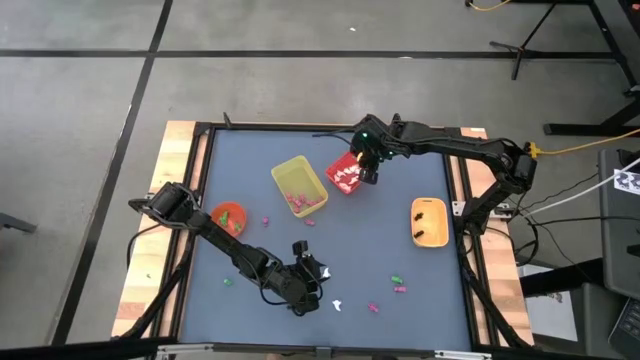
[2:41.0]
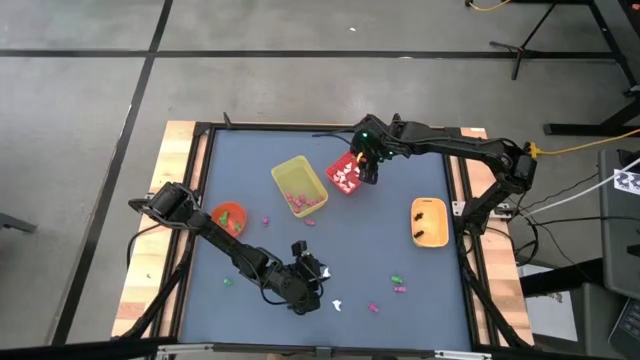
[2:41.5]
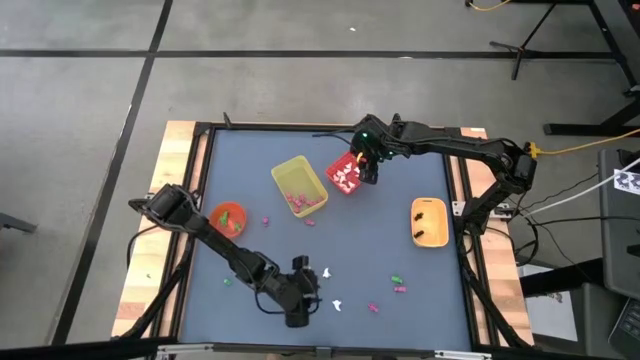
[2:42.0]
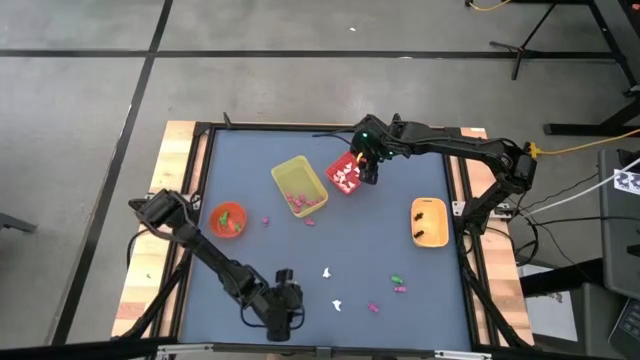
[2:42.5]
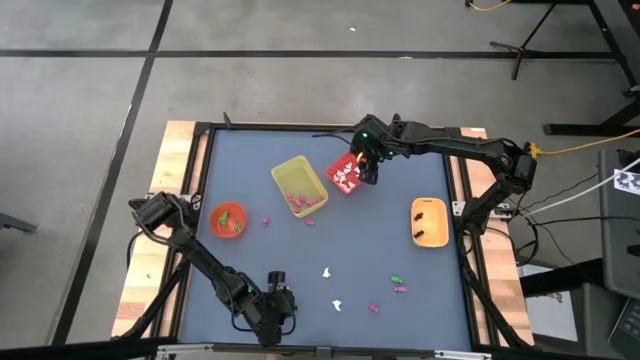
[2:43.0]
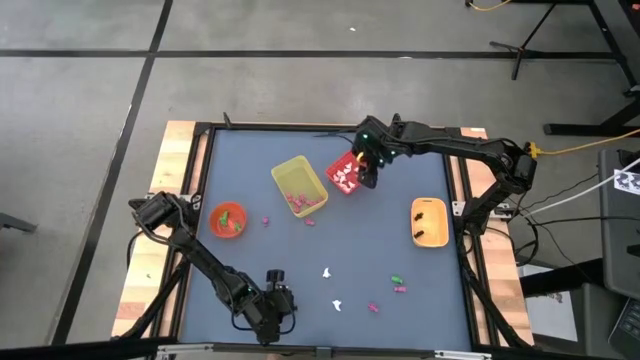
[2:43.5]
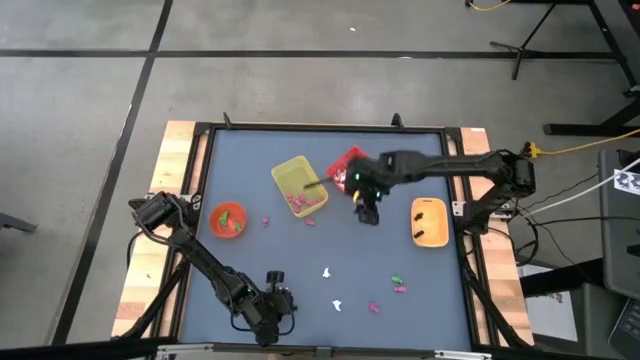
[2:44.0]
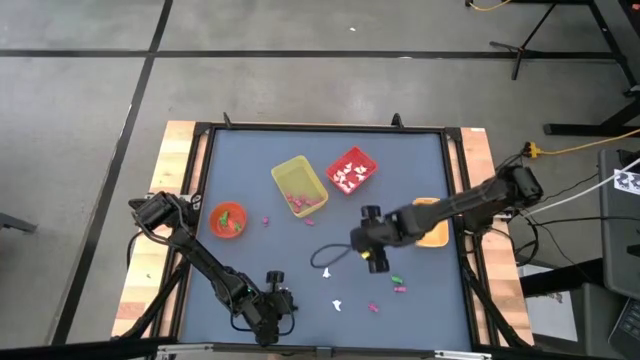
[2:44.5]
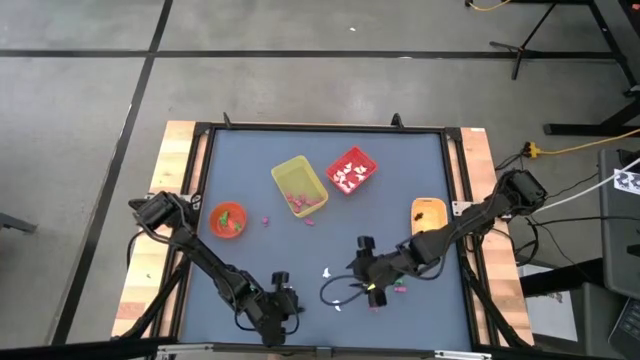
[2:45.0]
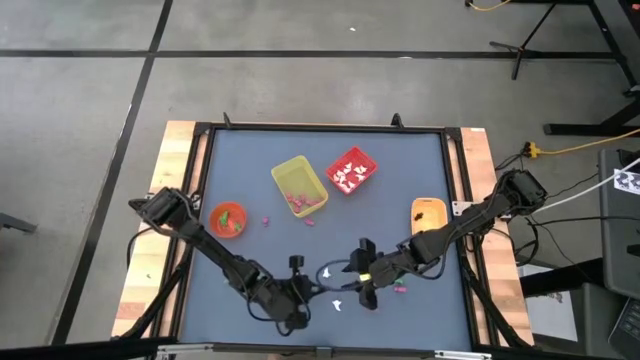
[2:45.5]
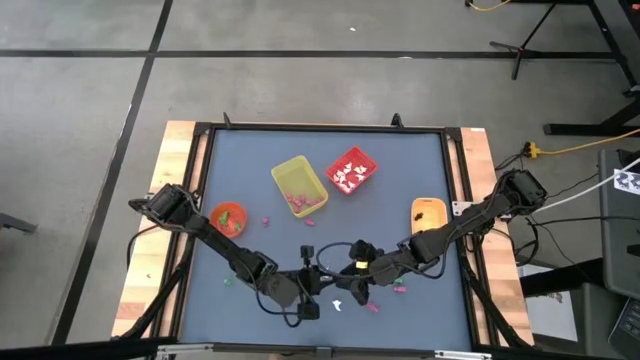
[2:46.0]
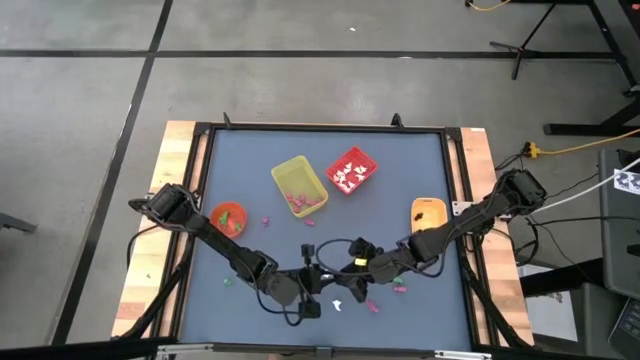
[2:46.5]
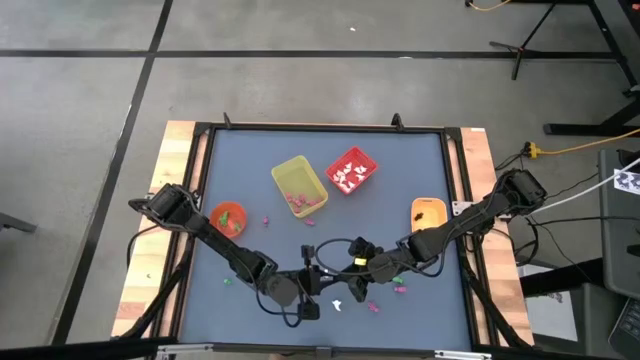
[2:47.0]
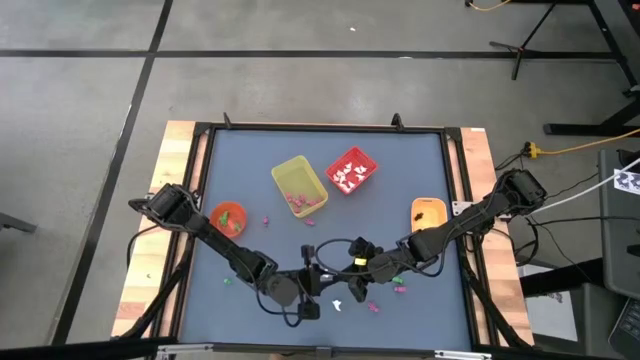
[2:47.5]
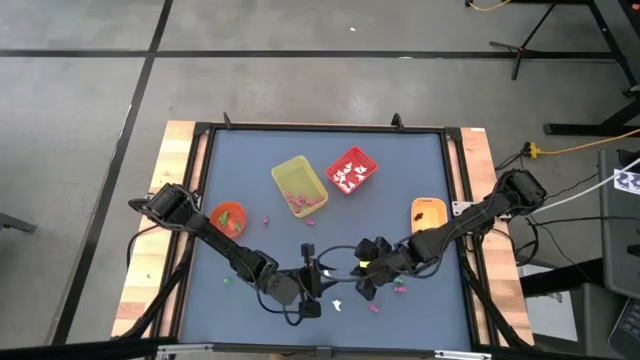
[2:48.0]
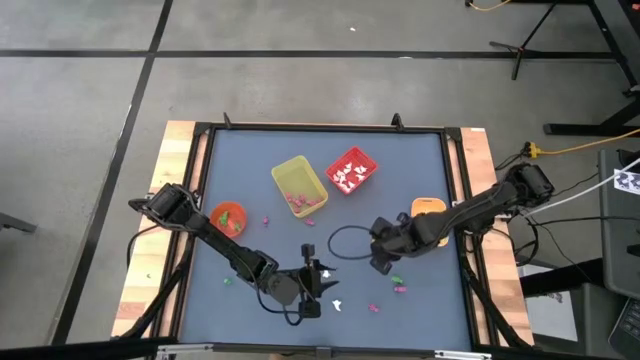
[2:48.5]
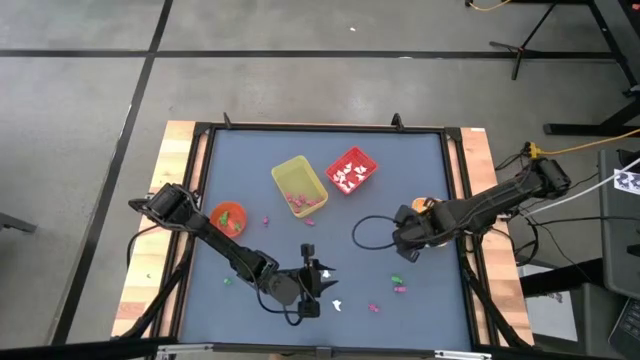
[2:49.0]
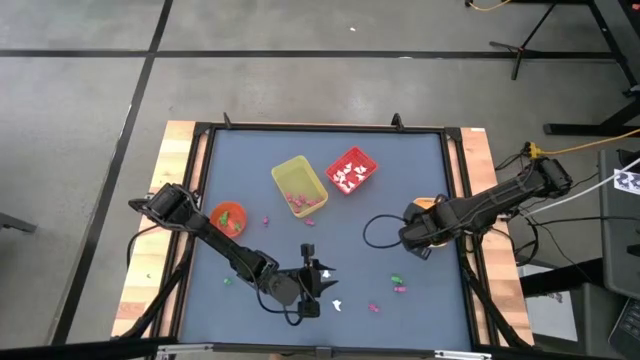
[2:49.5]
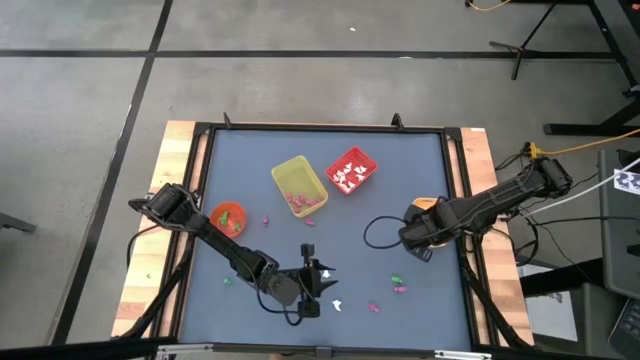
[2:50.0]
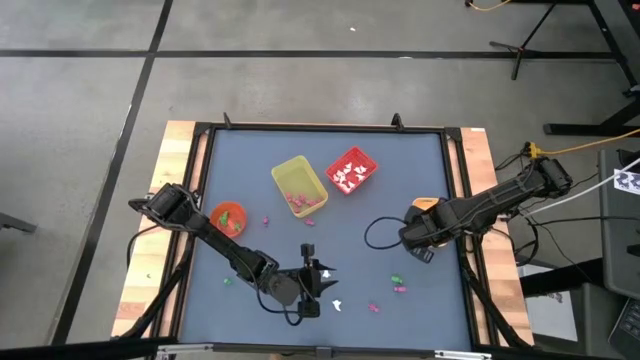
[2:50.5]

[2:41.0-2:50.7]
Task: Sort Halloween decoration
Put the black skeleton toy into the light orange bin

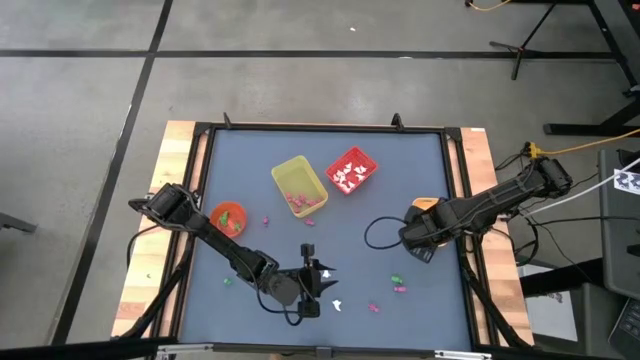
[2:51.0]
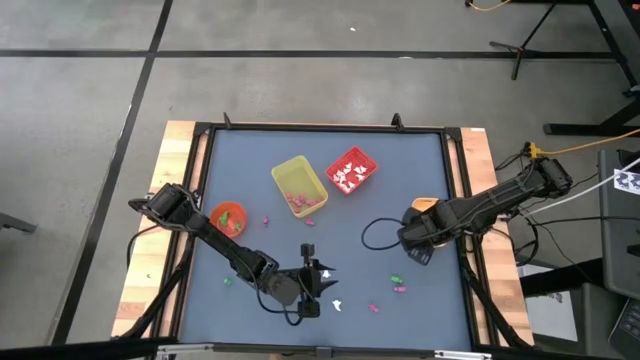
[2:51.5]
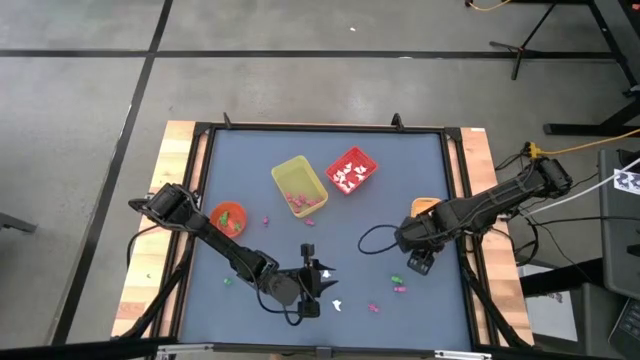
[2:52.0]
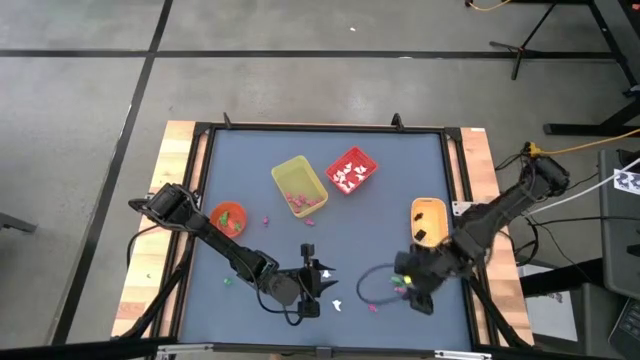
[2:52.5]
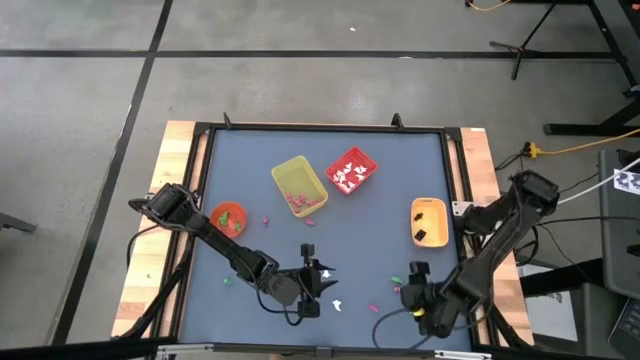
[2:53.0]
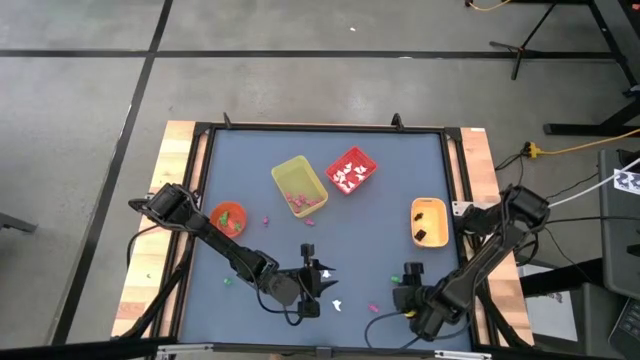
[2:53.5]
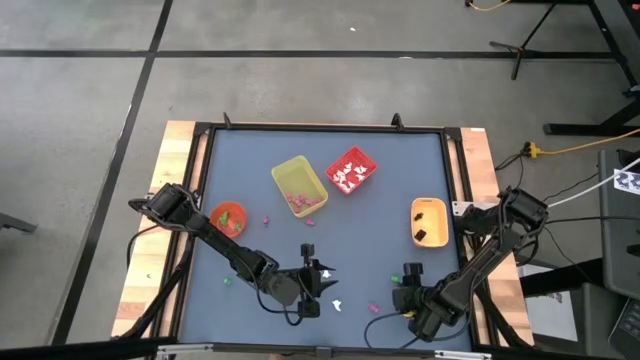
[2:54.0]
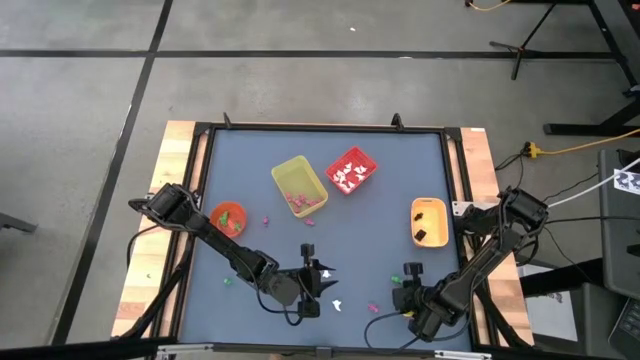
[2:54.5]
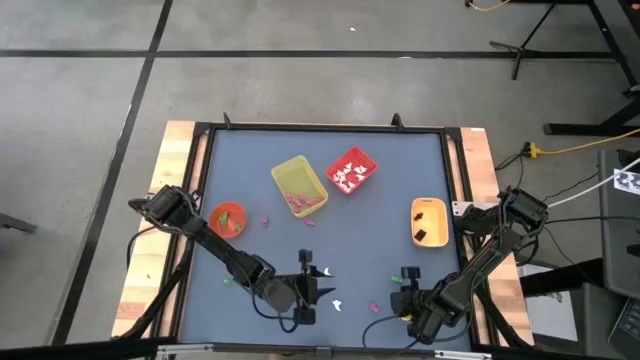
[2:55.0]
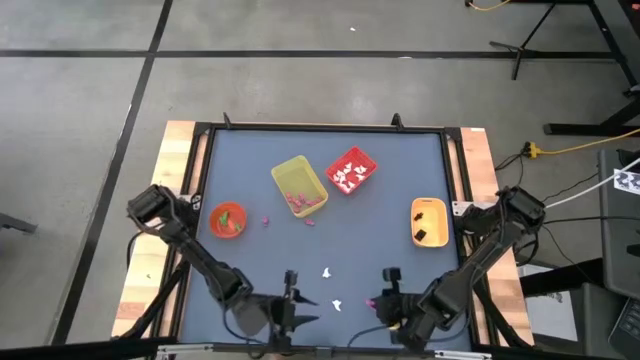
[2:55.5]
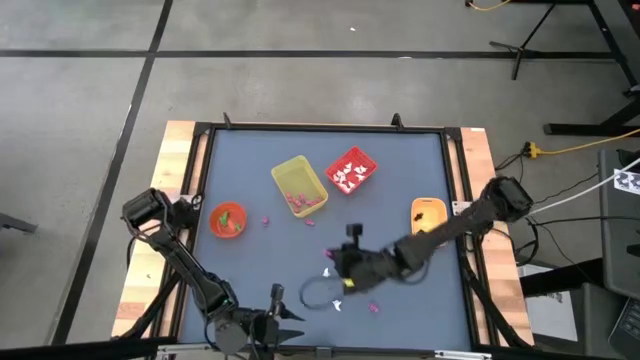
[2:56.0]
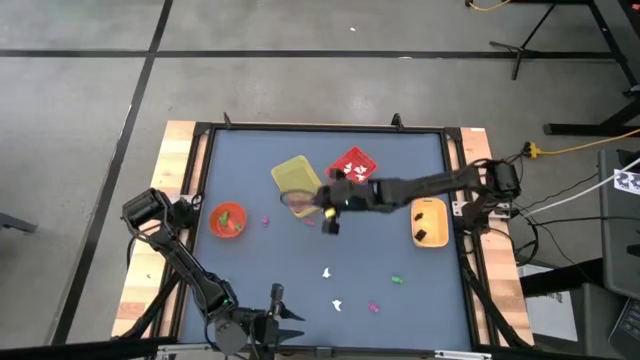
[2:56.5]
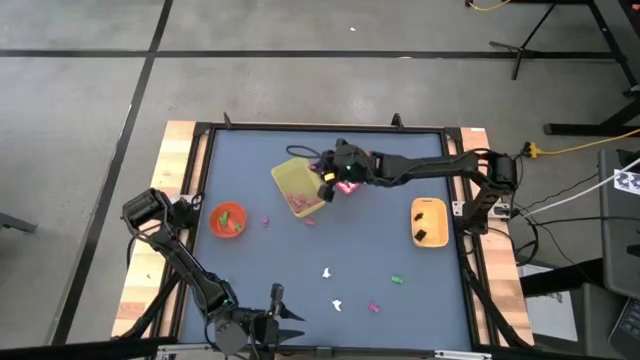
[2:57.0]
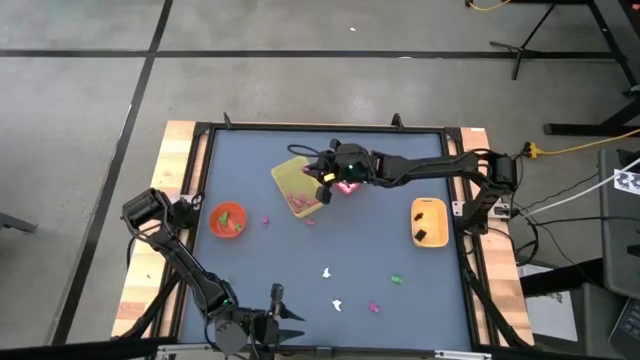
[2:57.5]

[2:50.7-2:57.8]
Put the pink skeleton toy into the yellow bin

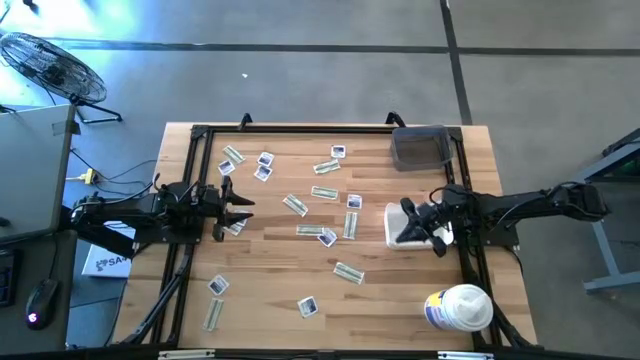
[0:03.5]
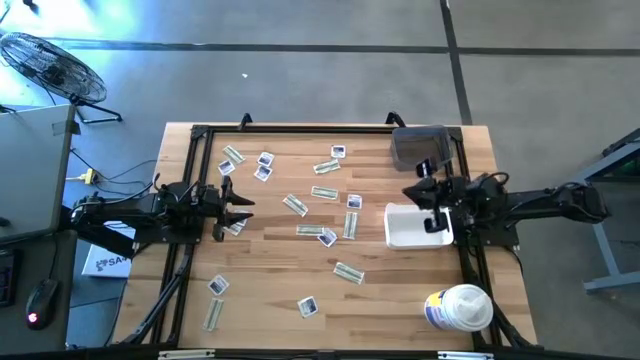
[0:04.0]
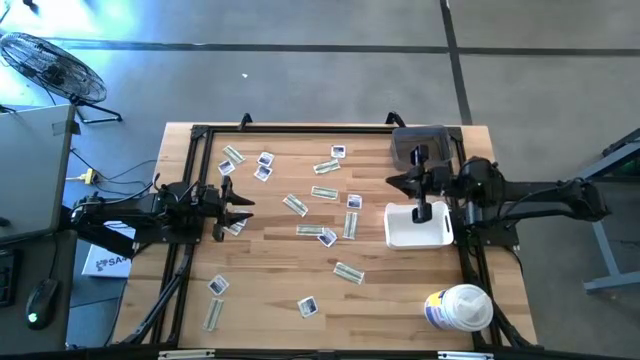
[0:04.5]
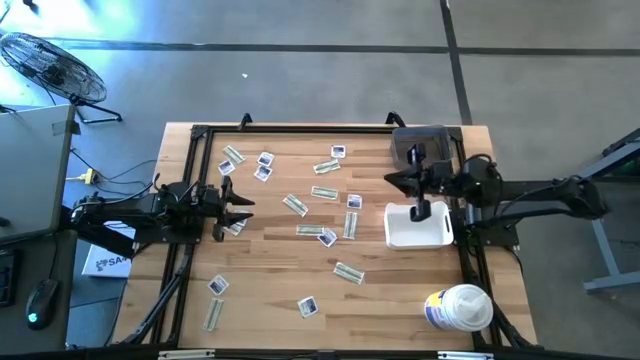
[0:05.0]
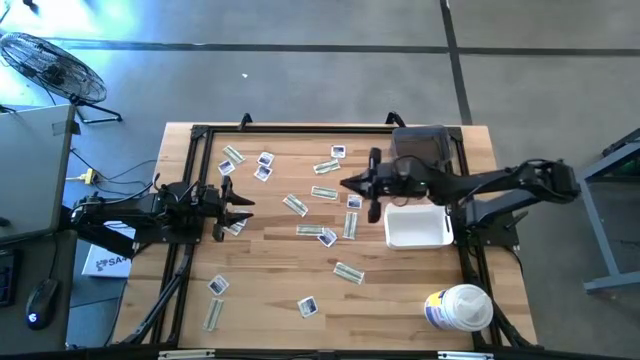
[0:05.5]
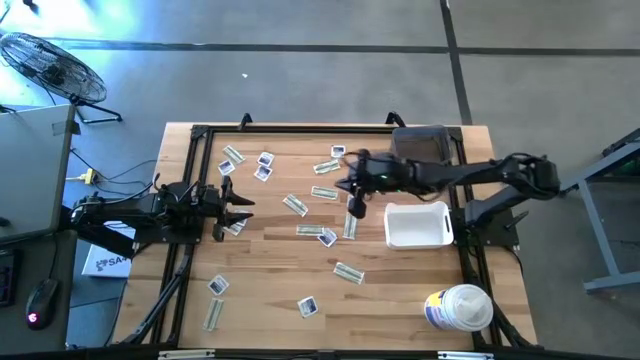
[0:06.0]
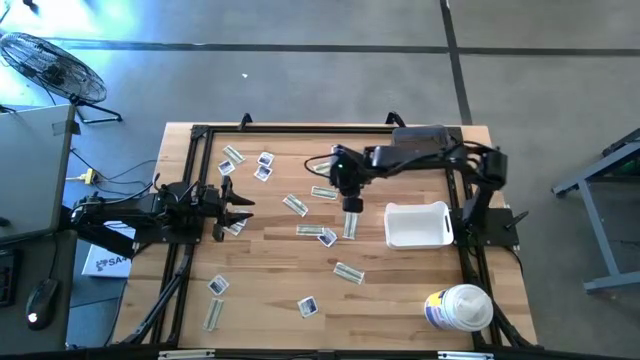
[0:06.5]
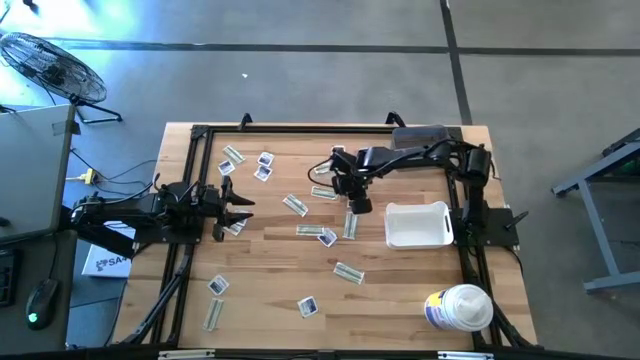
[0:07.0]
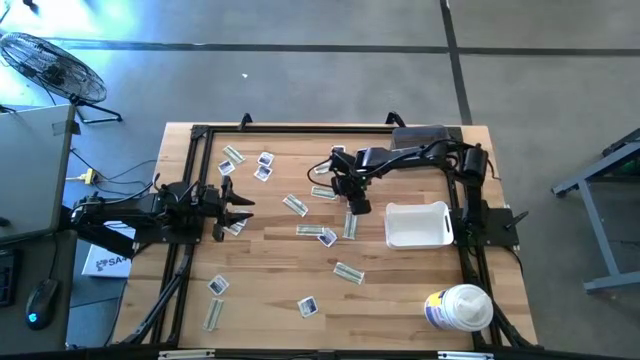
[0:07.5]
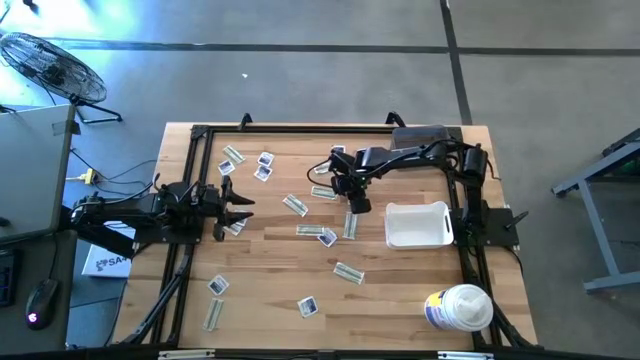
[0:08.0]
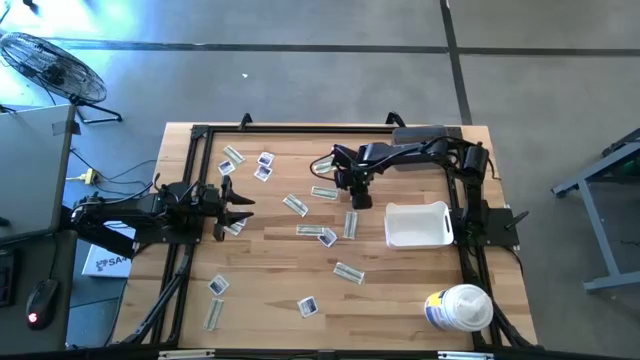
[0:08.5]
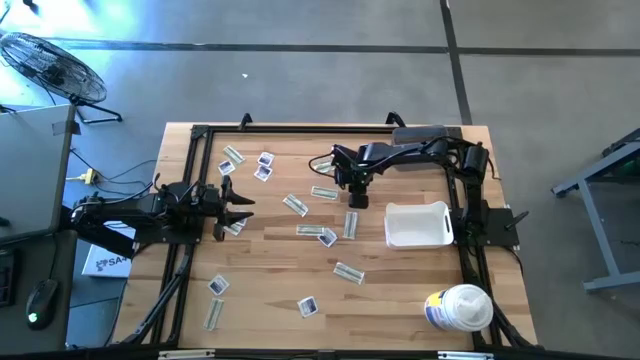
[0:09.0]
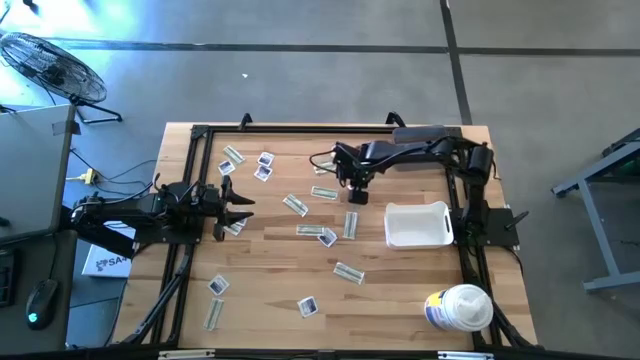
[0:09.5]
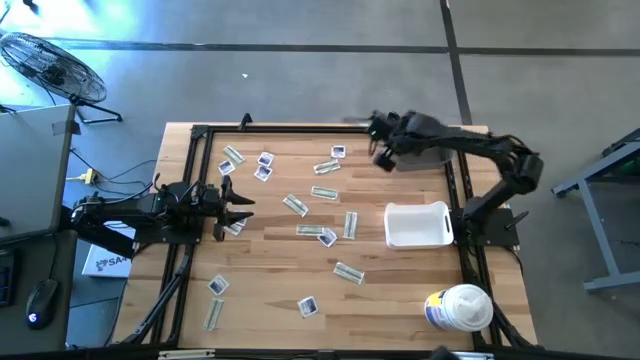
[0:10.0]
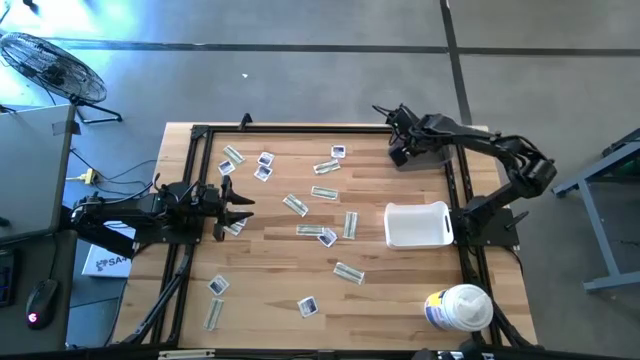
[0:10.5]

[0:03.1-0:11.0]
Task: Pick & Place First Aid Supplies
Put the alcohol pad into the black bin
